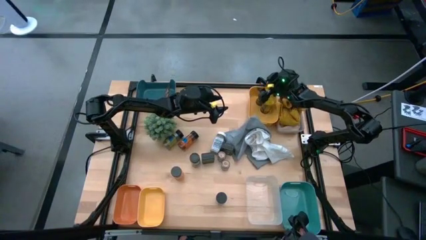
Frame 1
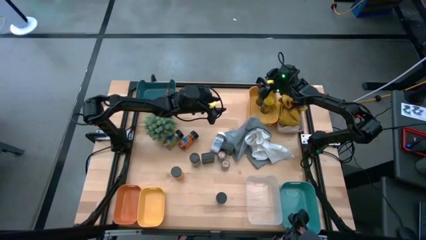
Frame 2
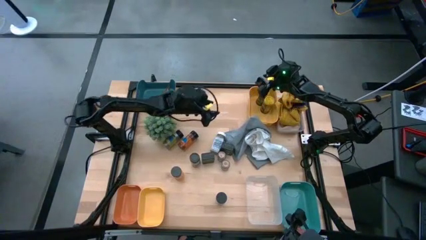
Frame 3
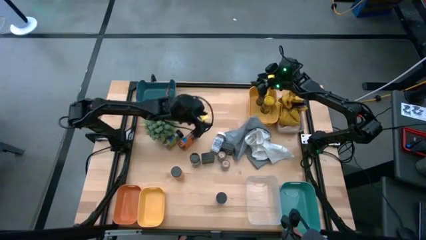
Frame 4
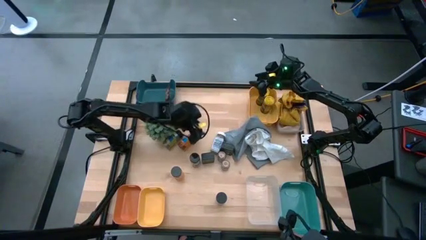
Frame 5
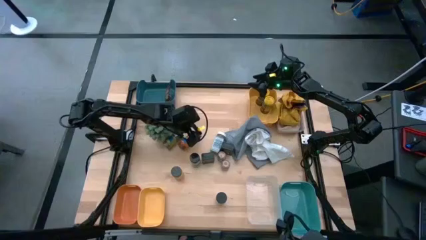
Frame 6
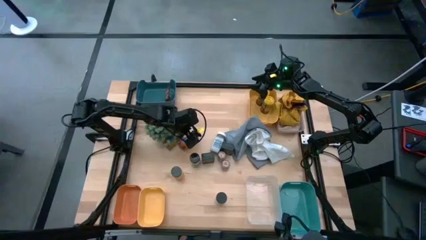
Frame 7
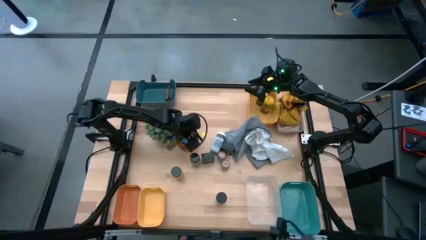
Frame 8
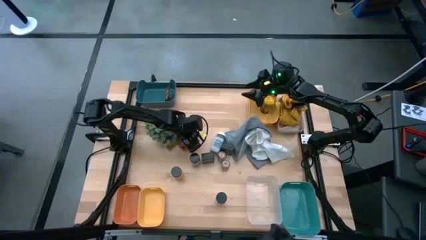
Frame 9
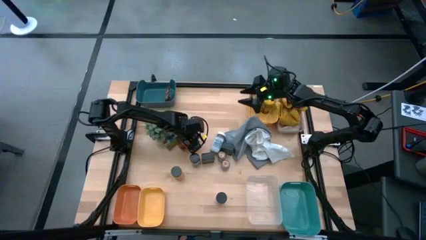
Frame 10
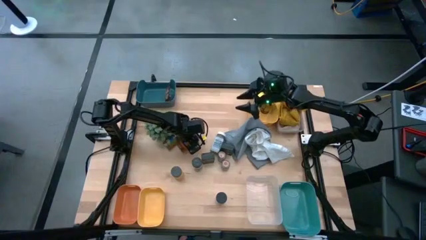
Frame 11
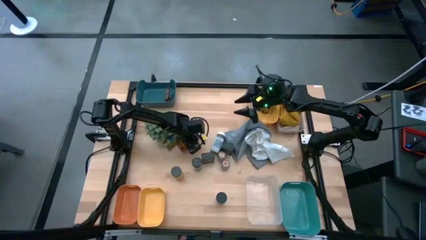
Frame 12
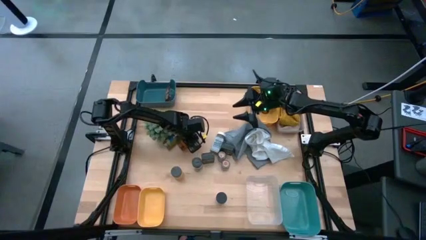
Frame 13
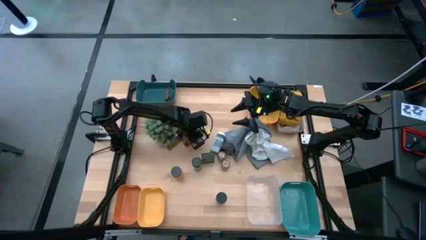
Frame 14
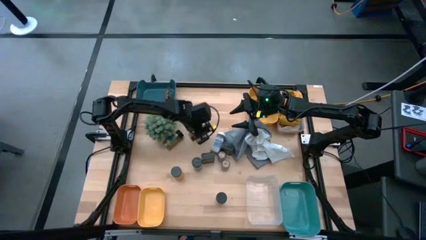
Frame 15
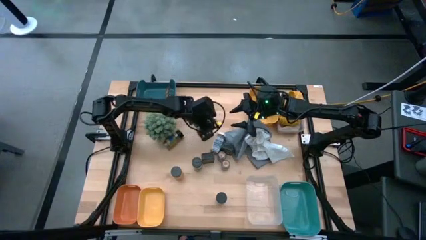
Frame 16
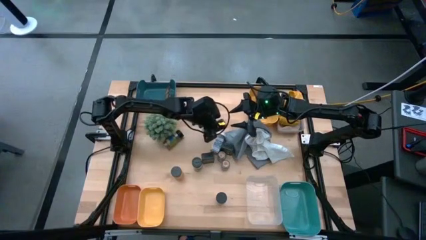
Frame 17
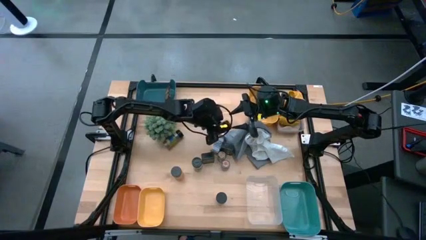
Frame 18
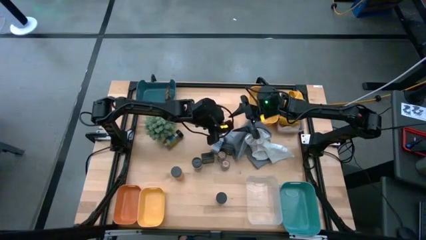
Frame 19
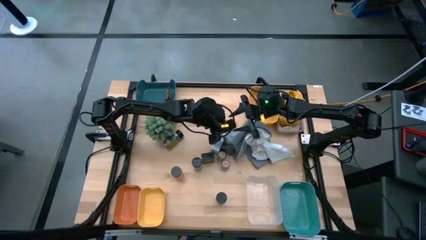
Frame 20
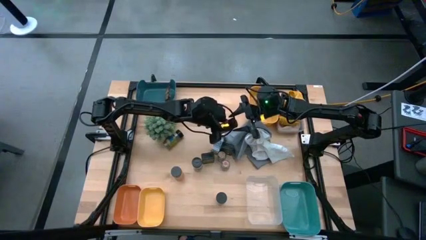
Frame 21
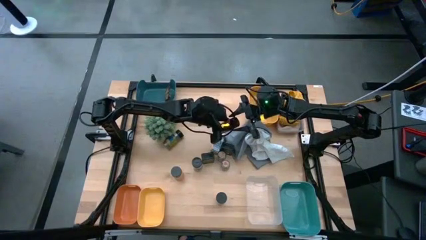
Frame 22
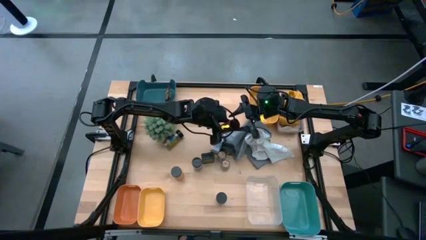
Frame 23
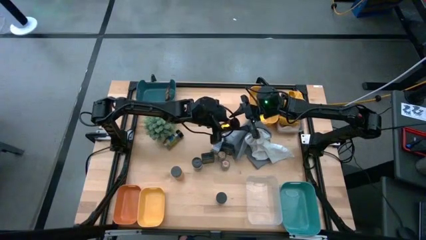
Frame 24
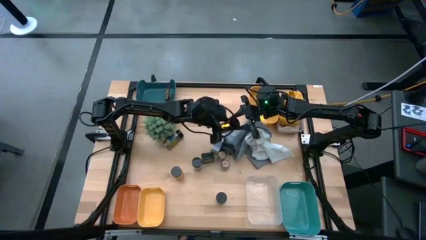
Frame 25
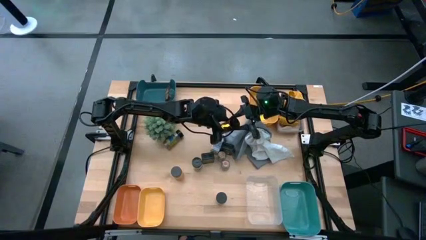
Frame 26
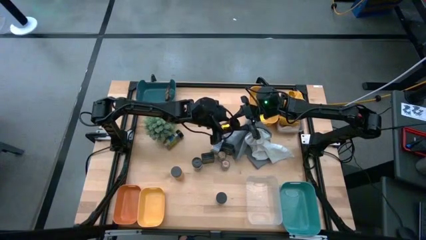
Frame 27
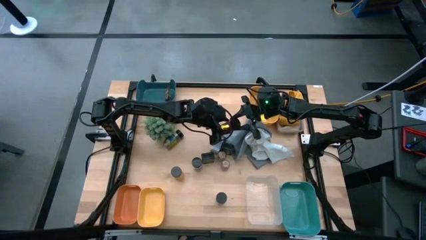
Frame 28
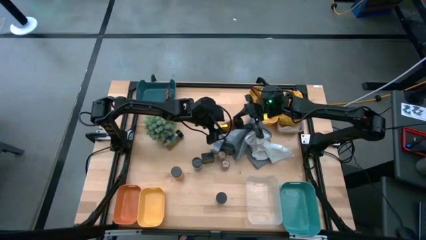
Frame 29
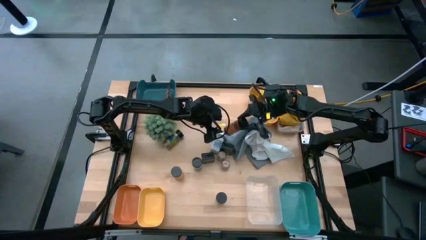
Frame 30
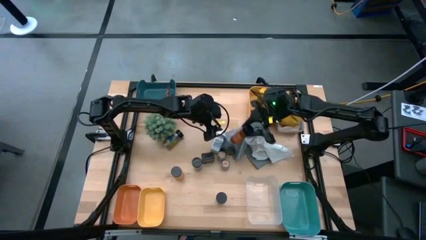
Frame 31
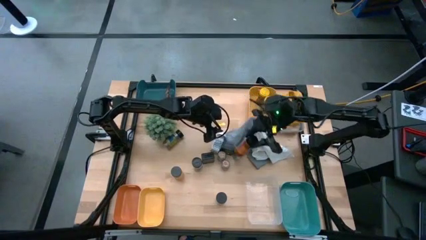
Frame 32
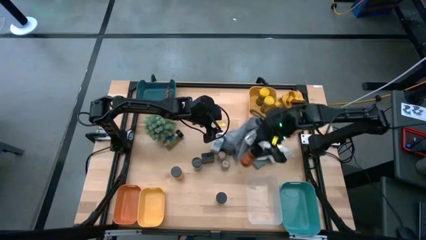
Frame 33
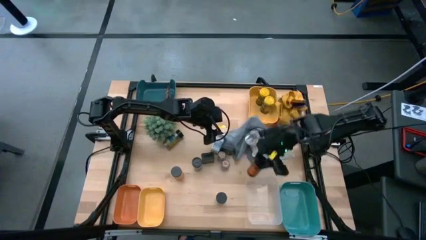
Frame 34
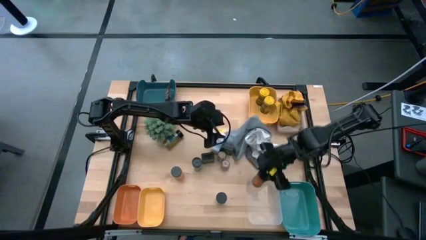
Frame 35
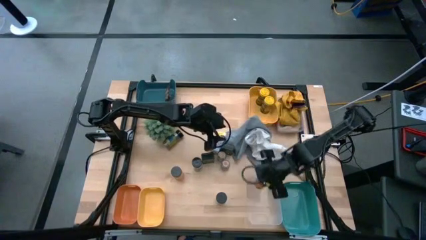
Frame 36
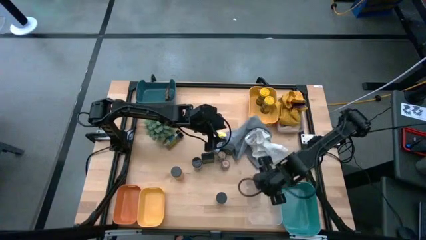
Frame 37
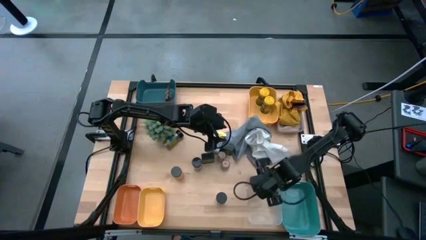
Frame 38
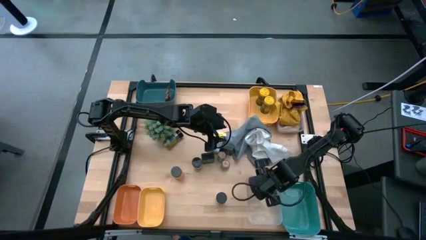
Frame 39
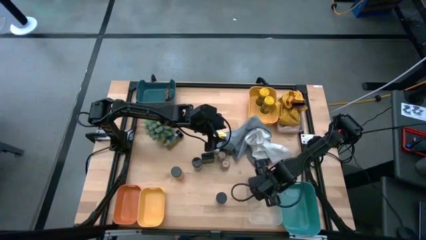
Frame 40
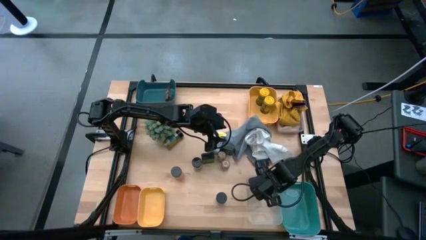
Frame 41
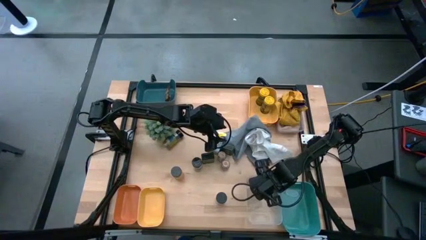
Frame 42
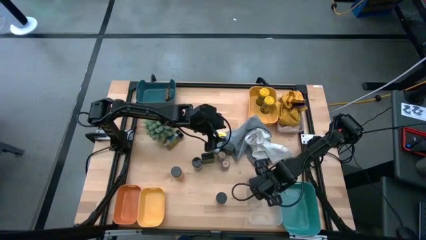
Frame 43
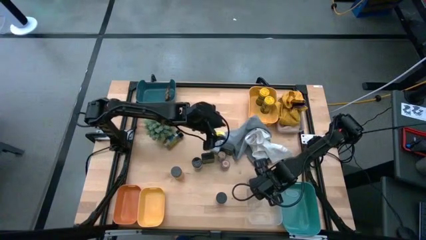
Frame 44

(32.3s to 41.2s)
Task: Sort spices by type
Put the black seasoning bottle into the transparent bin
